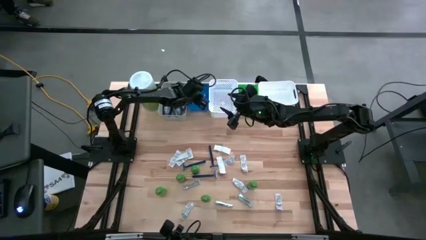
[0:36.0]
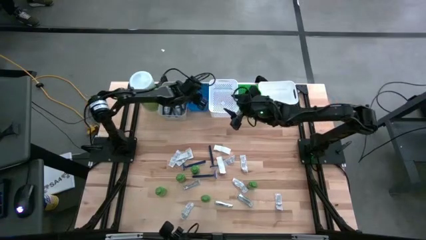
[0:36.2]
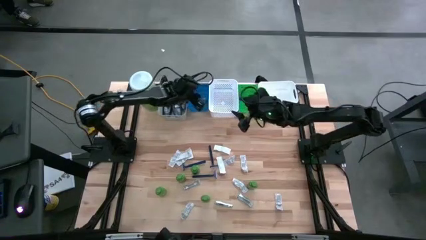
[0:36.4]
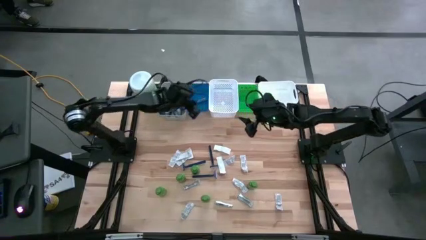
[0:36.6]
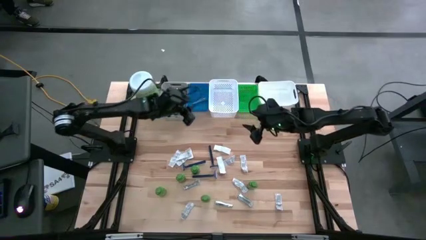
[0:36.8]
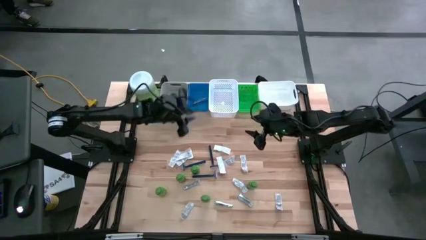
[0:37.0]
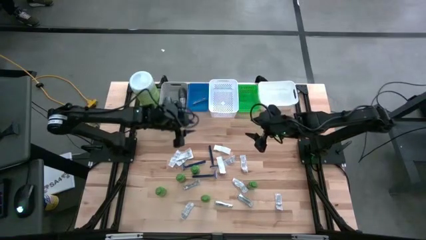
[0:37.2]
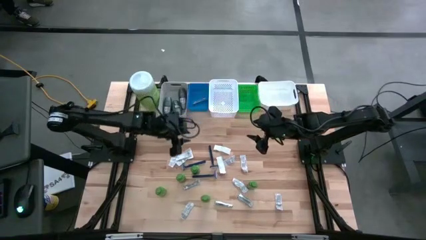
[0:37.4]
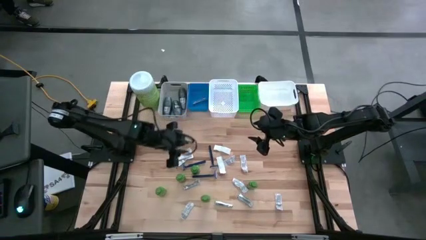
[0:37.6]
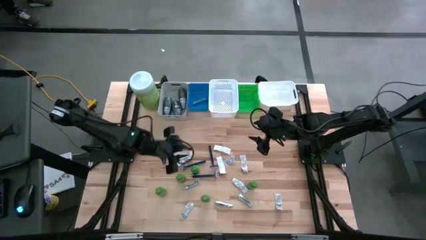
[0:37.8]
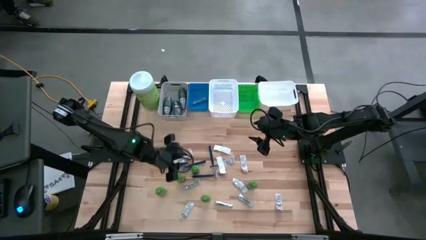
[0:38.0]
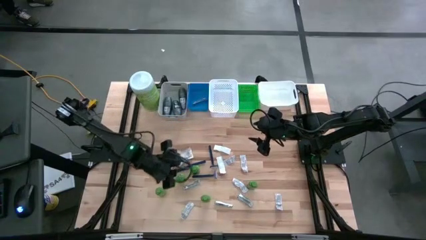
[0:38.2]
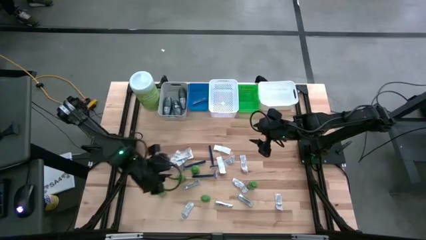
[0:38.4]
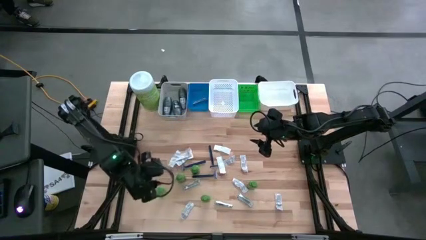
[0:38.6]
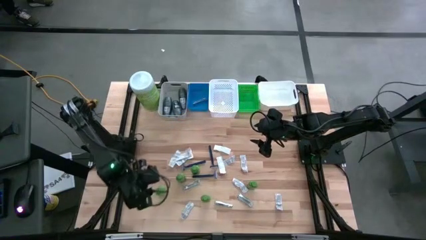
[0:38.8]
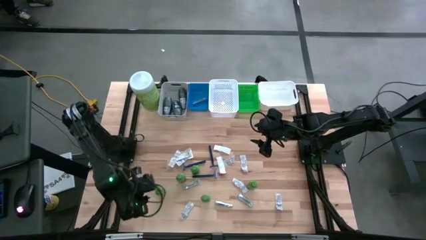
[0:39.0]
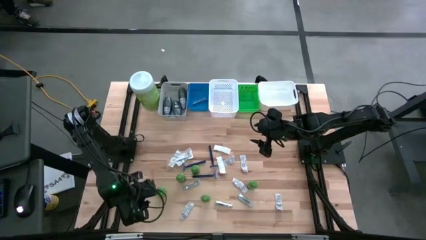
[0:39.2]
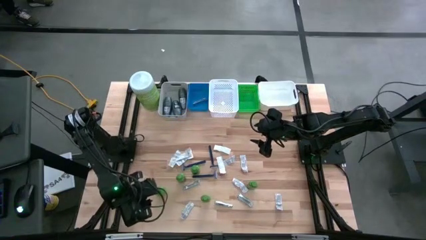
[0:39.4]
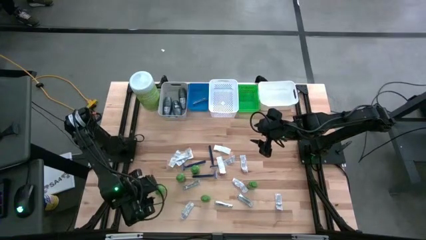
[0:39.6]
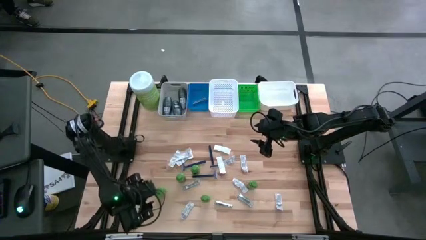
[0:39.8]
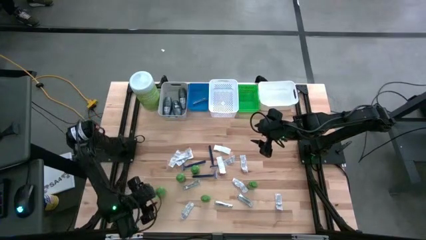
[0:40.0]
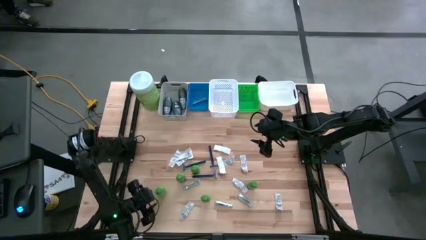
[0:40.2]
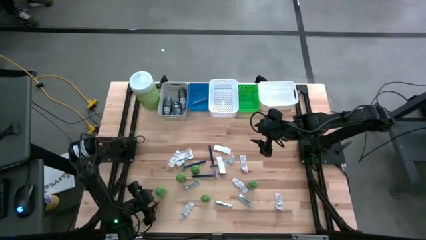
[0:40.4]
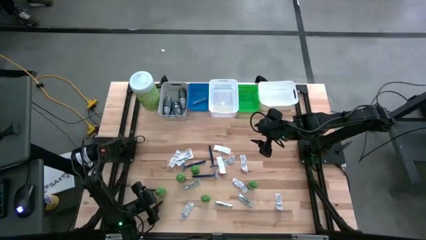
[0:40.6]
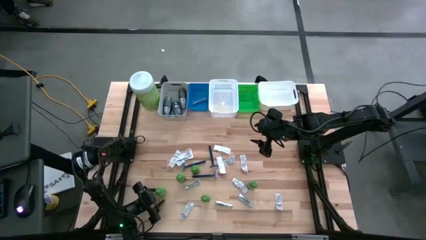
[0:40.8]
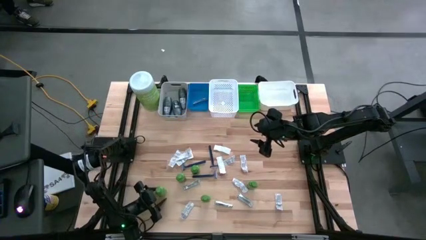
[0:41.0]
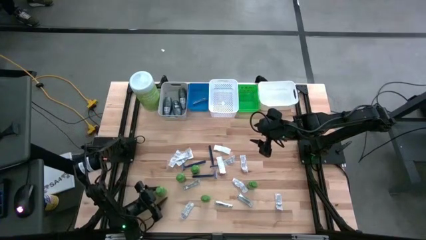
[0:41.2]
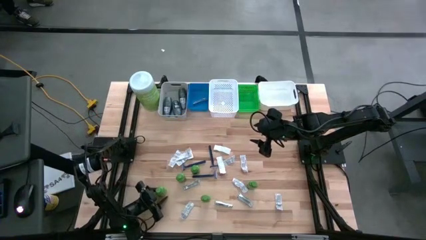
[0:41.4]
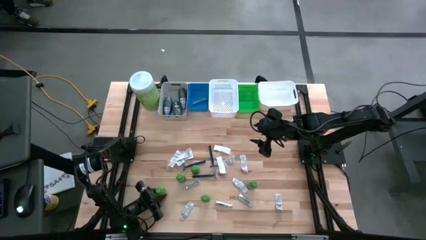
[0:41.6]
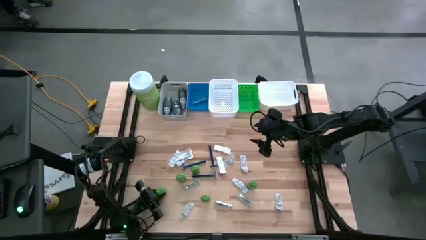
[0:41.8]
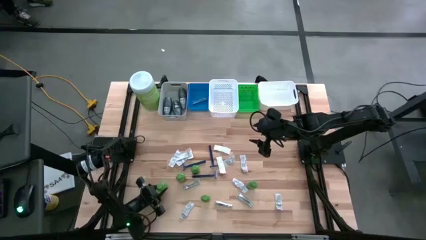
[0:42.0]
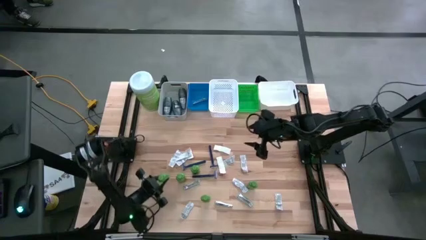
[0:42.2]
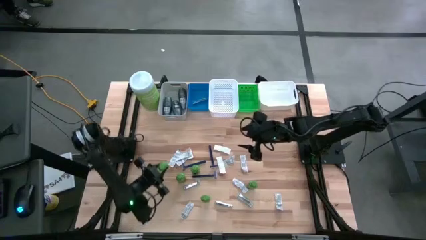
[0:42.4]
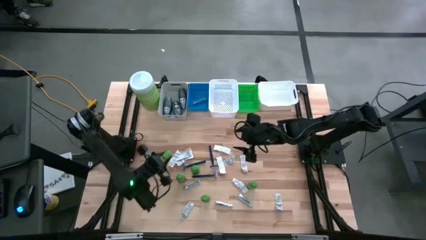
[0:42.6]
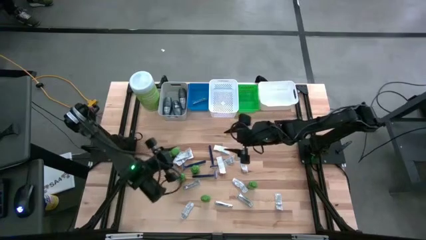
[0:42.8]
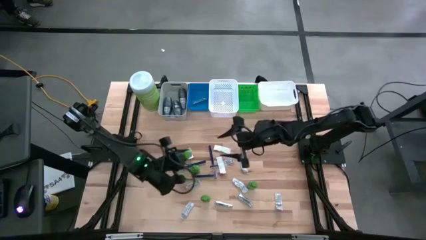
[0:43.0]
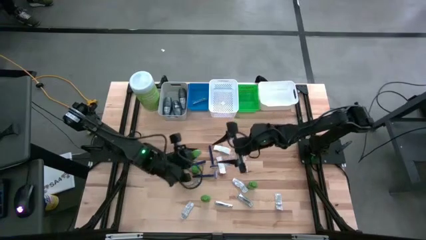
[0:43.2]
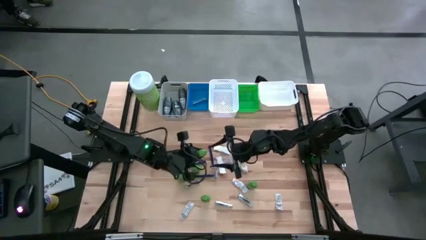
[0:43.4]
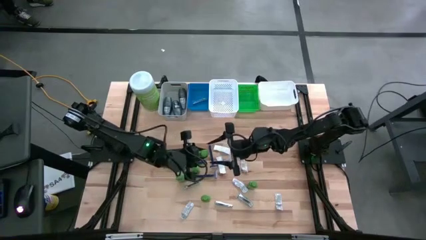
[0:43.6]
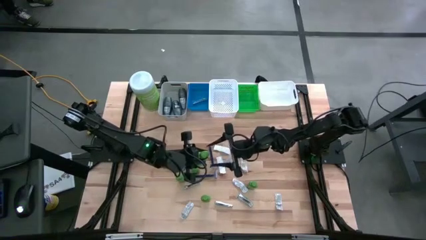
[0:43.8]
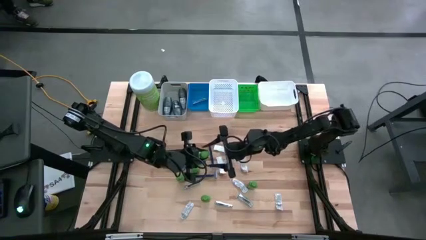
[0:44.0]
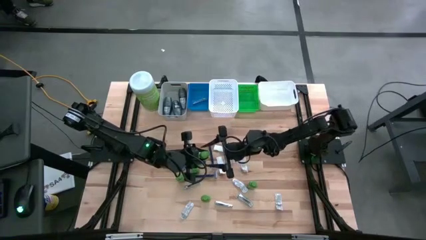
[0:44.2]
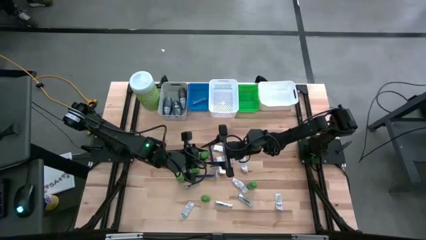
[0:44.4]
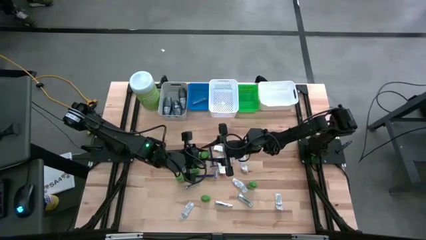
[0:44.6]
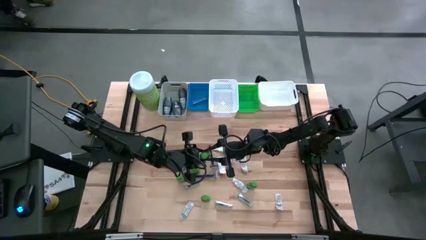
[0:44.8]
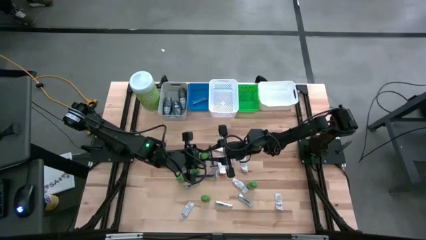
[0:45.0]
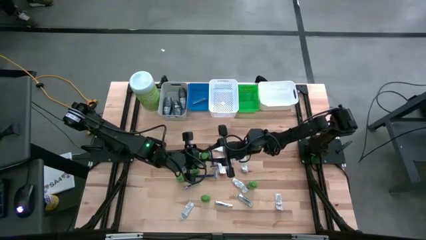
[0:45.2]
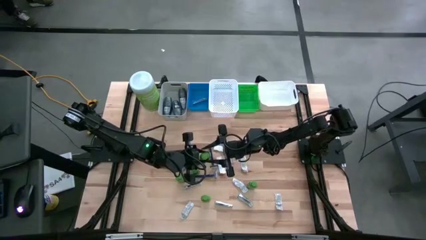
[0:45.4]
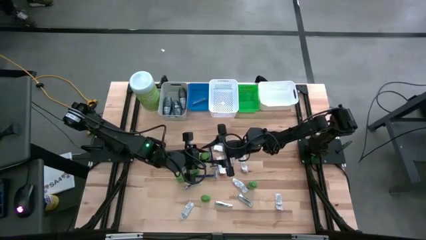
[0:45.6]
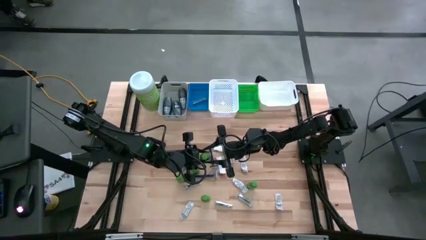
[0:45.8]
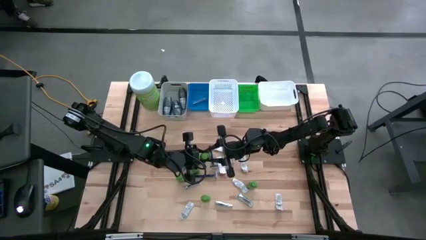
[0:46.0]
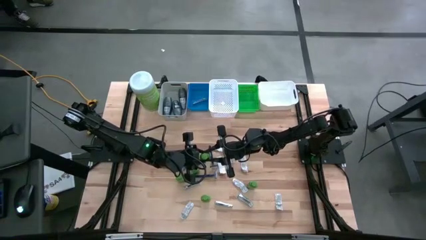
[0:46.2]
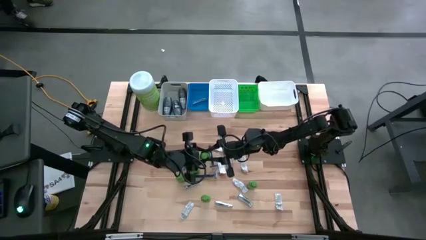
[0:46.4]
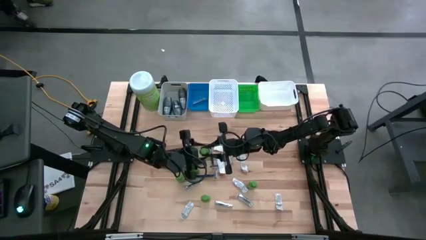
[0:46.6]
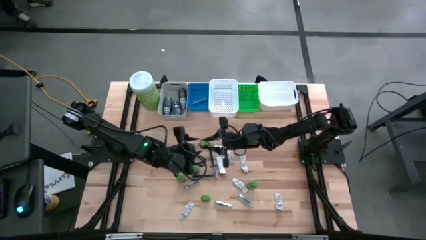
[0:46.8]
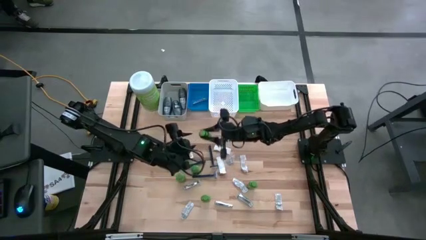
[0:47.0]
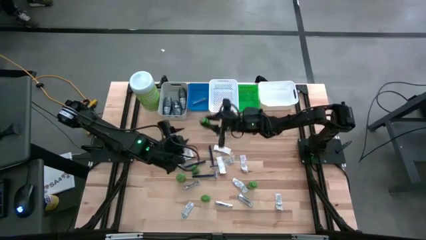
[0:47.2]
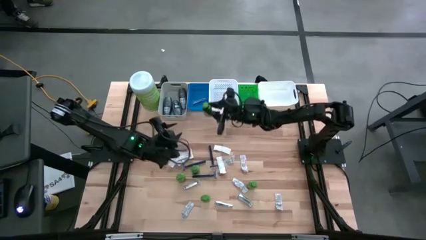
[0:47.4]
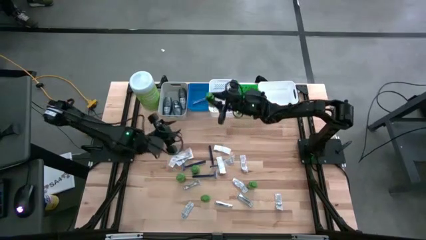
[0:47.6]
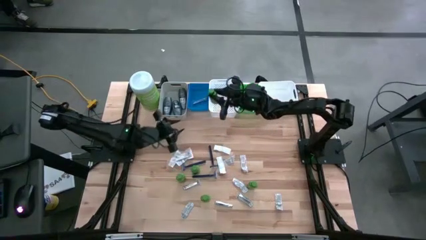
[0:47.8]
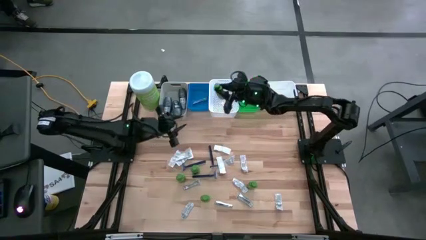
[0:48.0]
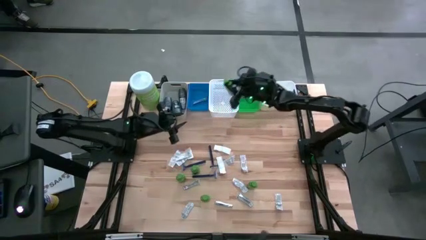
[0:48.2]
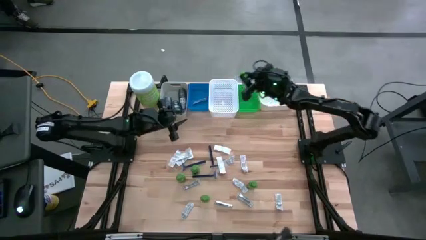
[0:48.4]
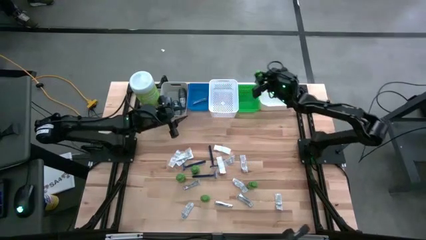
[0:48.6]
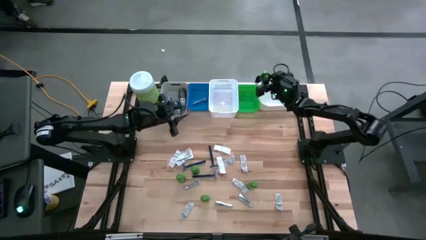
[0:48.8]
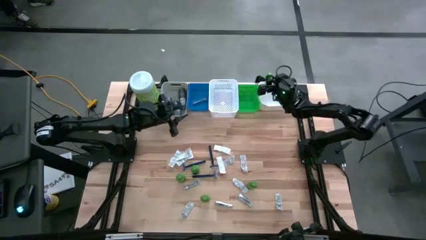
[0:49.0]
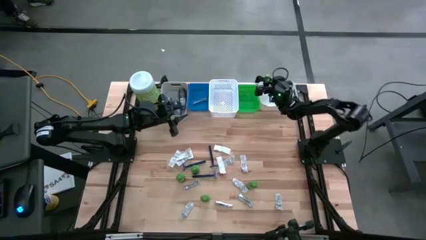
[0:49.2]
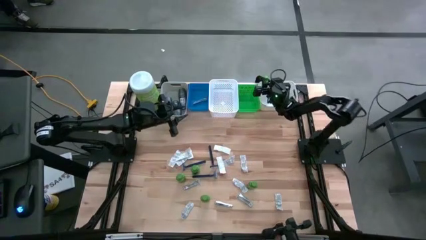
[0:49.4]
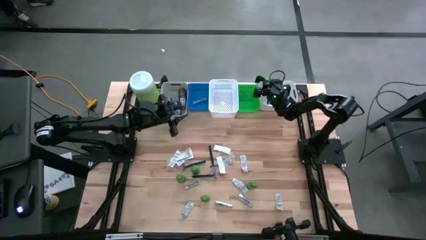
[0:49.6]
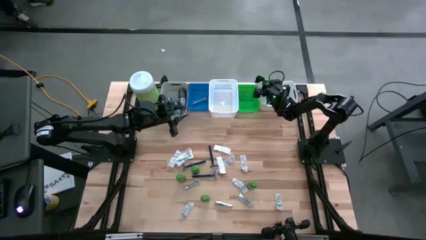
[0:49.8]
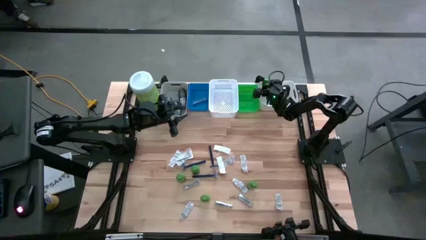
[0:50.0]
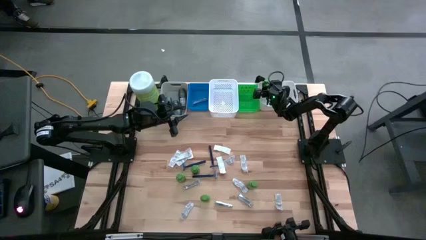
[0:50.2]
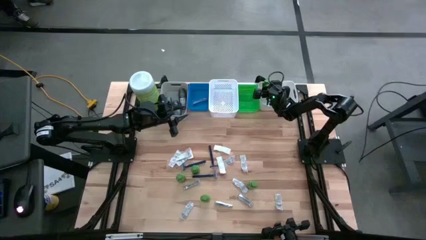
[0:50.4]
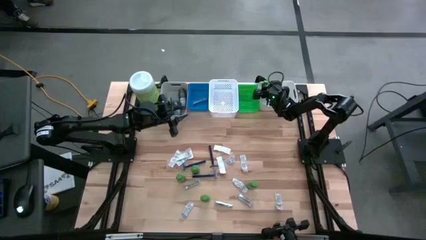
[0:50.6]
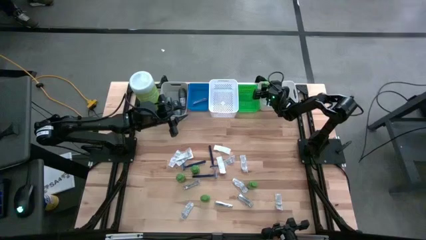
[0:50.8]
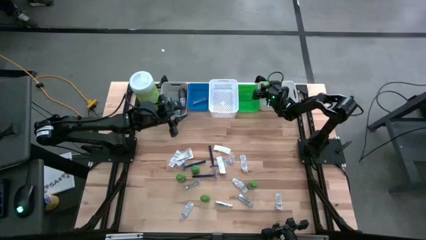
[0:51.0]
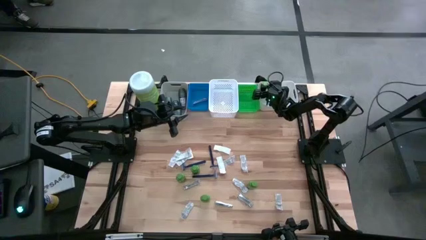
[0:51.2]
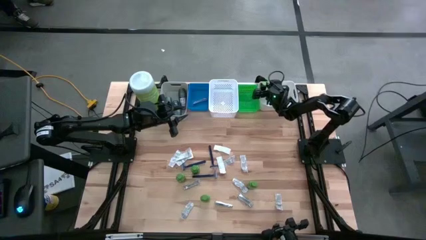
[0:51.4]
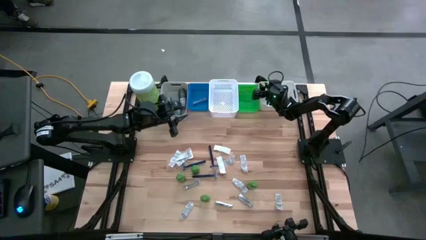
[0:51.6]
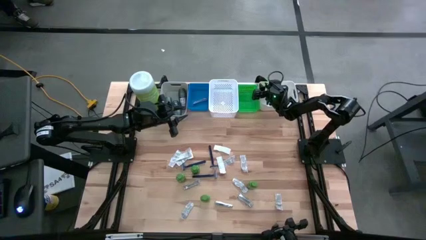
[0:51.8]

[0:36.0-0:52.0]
Task: Pick & Place Travel size toiletries
Put the green shampoo into the right white bin
